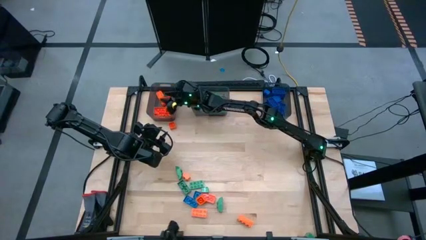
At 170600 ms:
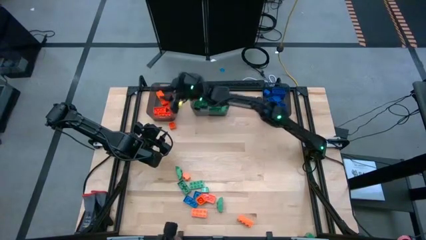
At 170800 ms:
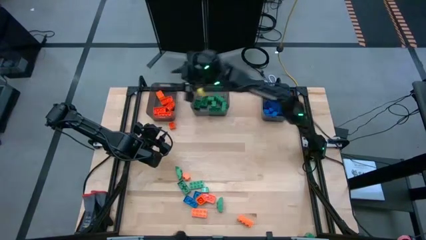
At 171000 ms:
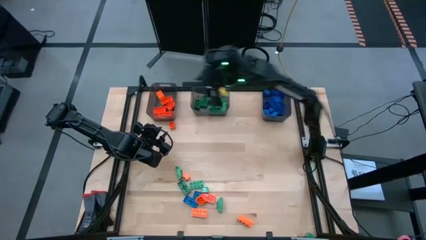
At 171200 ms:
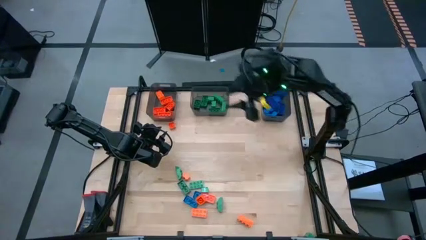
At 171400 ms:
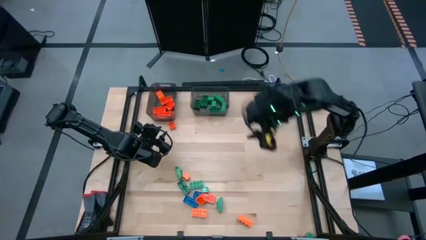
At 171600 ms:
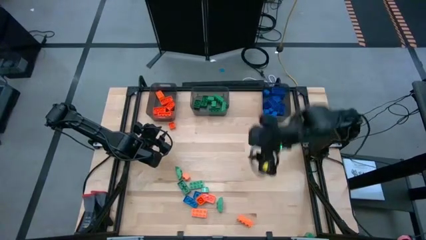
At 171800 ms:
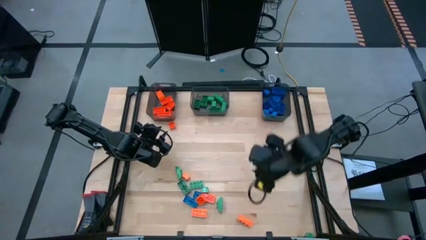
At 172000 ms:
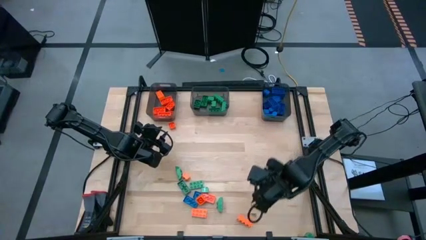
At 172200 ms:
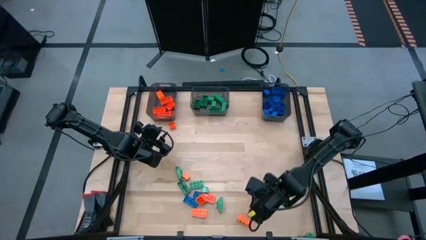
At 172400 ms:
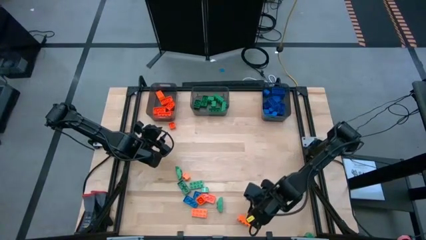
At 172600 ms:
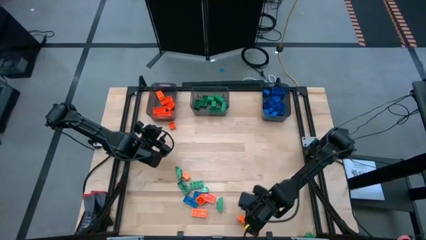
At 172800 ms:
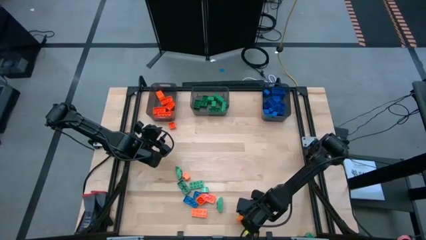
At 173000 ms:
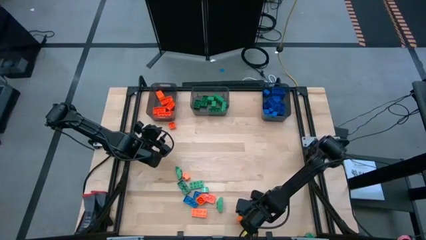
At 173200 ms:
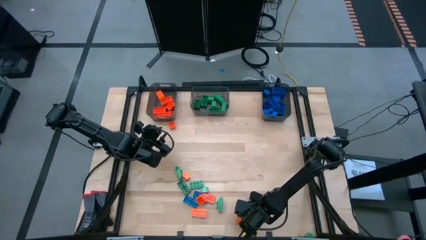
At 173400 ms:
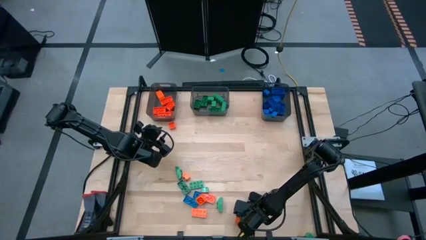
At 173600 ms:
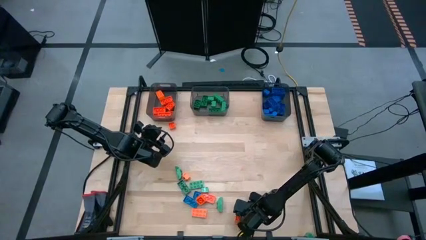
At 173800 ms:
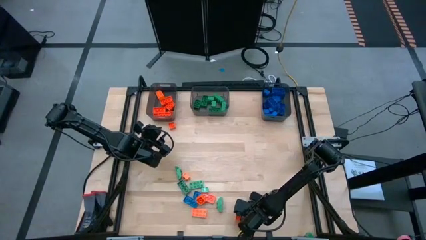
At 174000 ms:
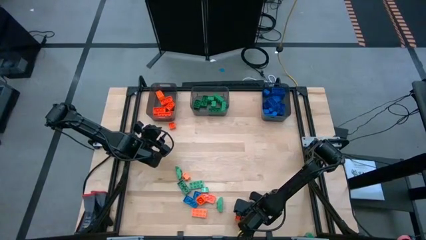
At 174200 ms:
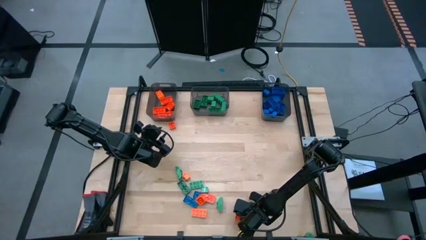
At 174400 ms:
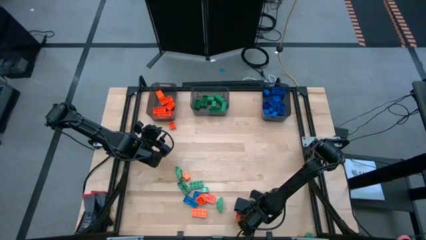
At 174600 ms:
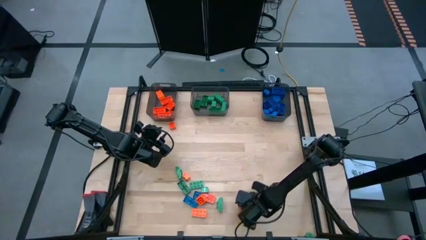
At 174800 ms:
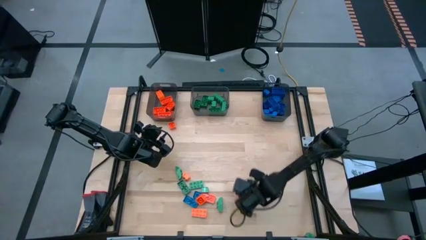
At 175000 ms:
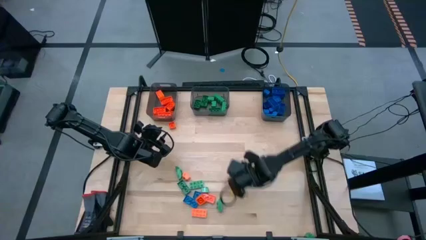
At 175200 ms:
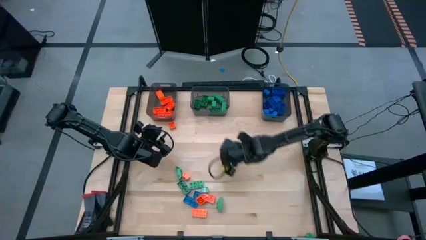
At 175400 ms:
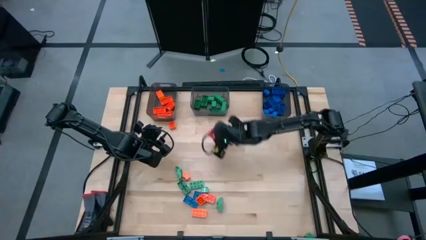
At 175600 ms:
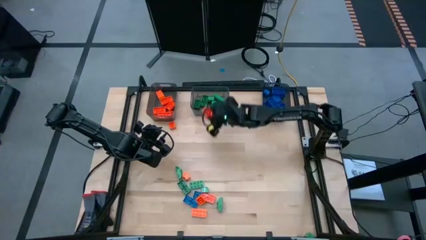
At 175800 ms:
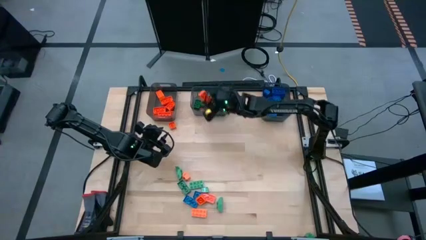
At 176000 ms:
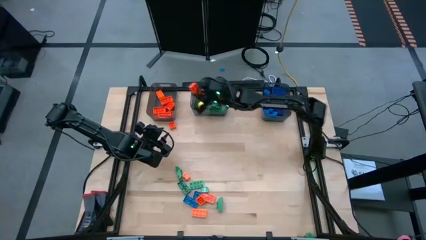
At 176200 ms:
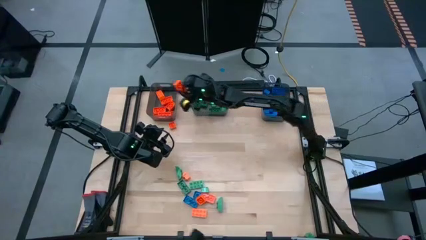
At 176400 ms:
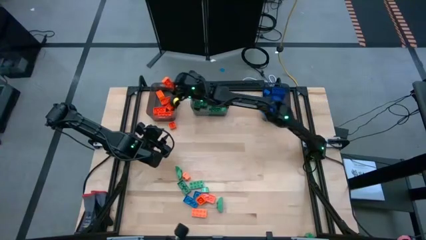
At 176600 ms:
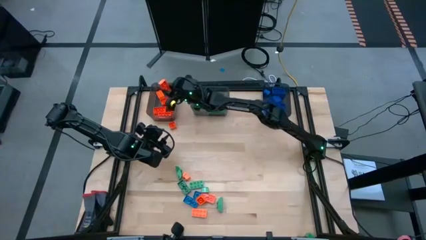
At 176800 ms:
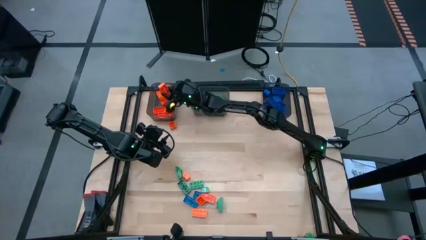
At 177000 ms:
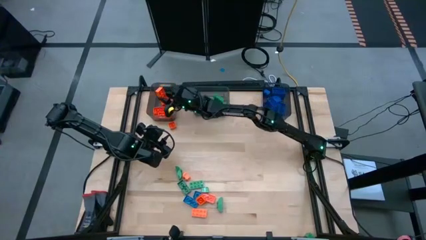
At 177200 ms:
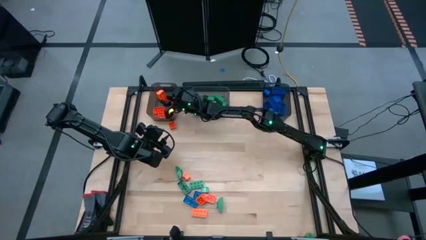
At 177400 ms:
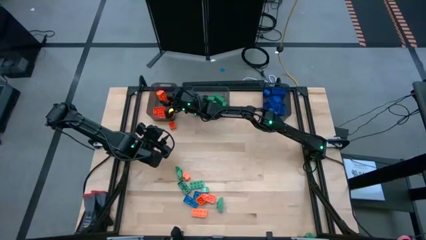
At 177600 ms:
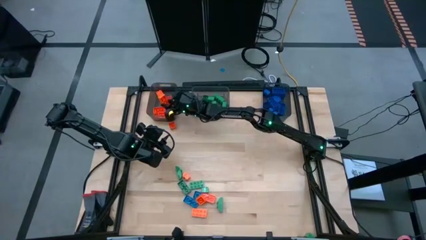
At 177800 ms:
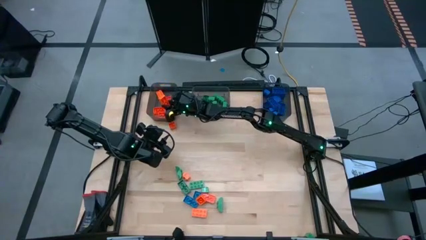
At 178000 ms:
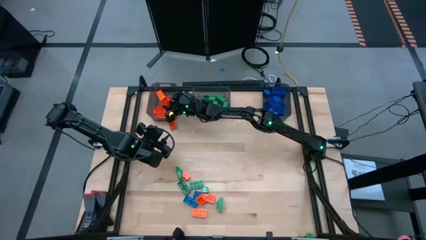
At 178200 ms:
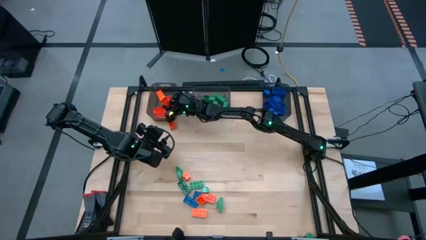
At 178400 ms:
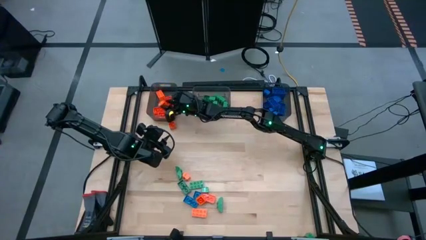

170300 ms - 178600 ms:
Task: Sort blocks
Put the orange game piece into the left black bin

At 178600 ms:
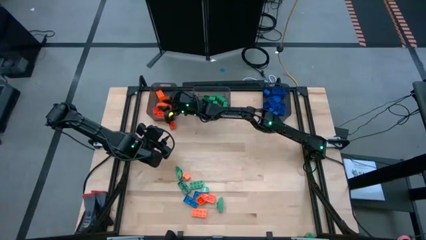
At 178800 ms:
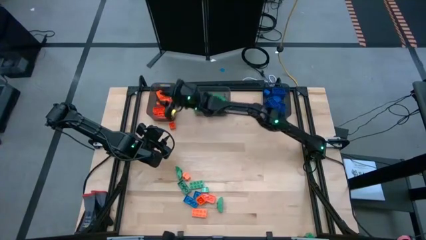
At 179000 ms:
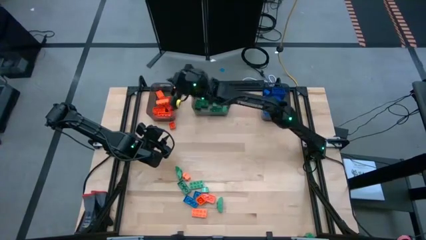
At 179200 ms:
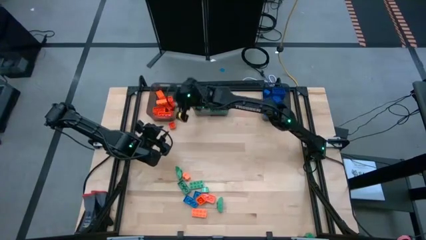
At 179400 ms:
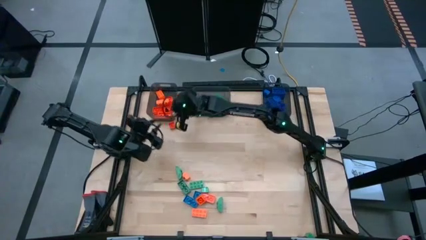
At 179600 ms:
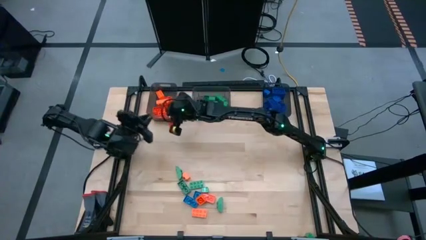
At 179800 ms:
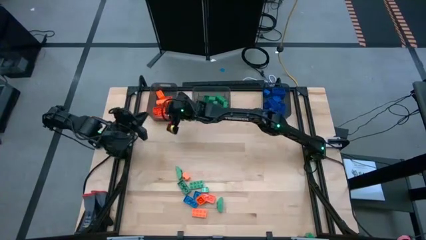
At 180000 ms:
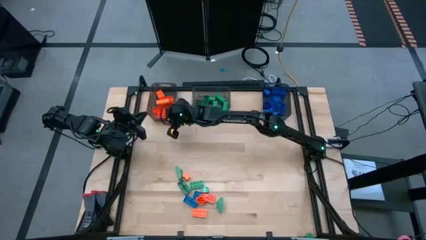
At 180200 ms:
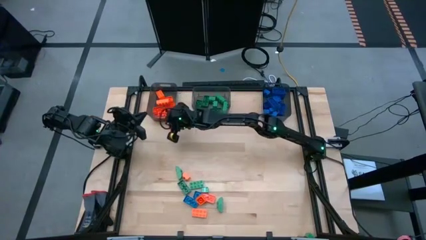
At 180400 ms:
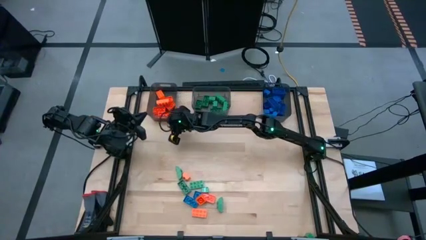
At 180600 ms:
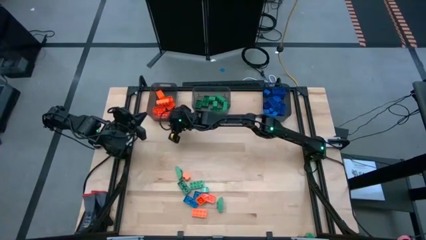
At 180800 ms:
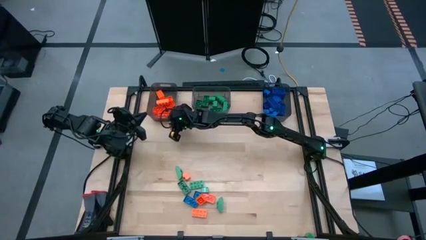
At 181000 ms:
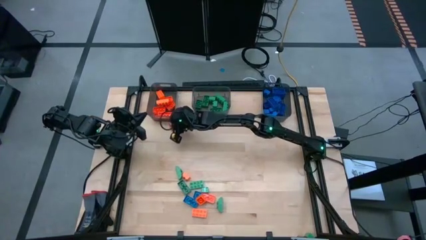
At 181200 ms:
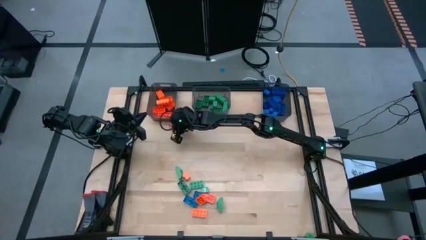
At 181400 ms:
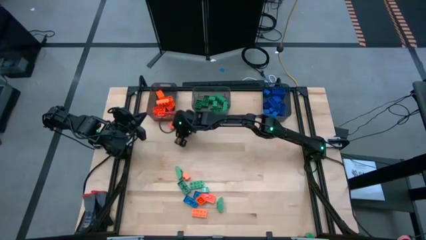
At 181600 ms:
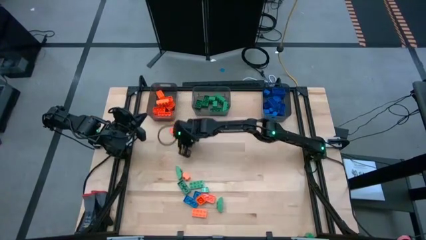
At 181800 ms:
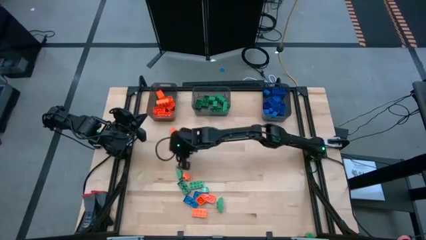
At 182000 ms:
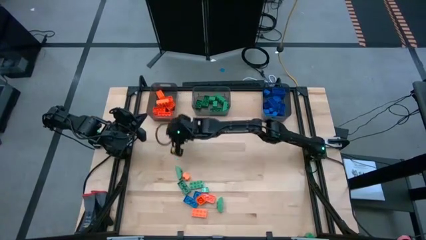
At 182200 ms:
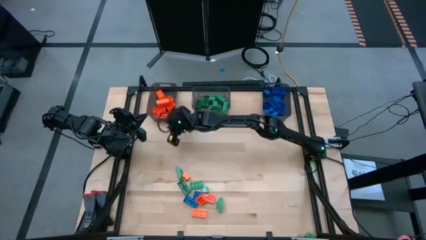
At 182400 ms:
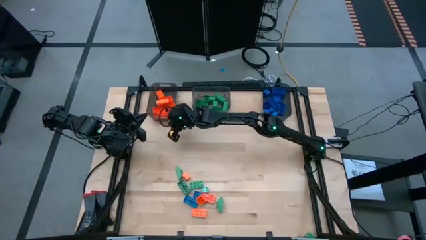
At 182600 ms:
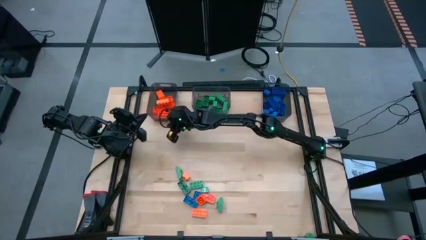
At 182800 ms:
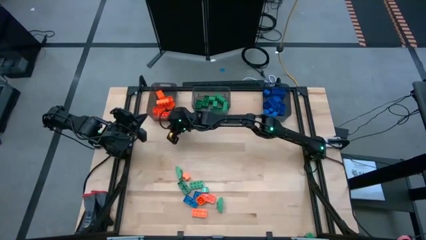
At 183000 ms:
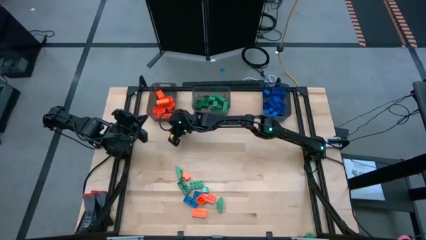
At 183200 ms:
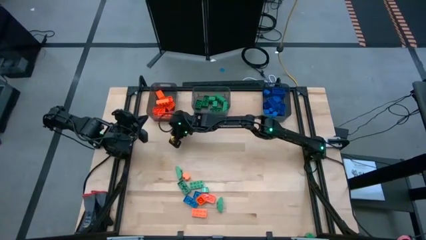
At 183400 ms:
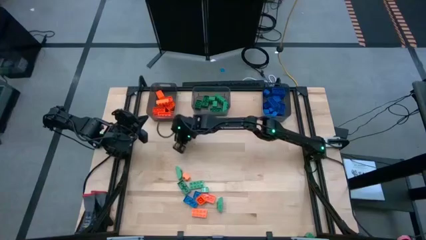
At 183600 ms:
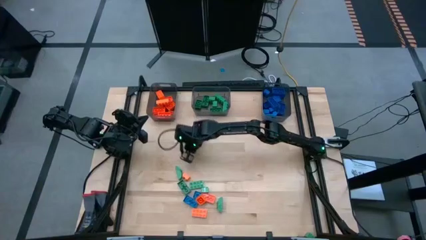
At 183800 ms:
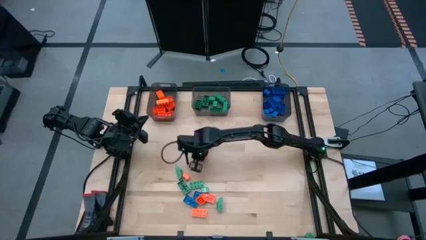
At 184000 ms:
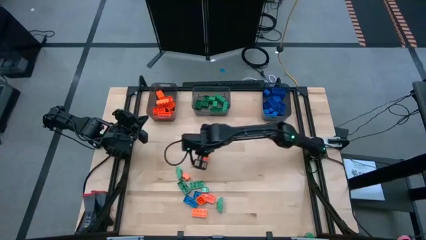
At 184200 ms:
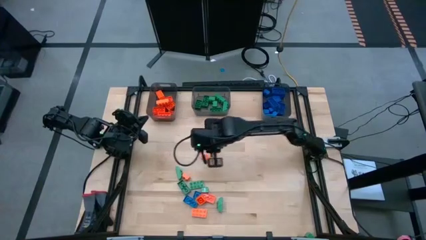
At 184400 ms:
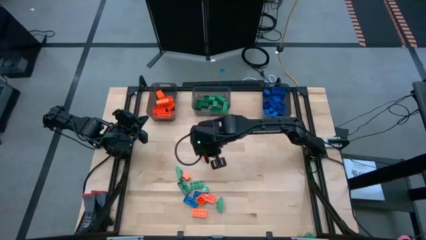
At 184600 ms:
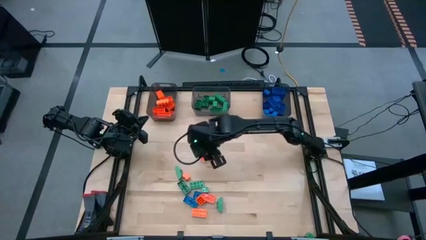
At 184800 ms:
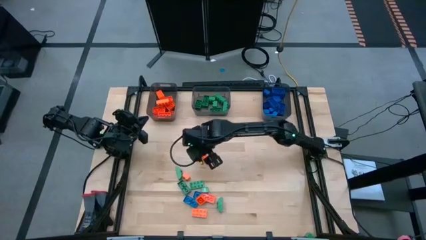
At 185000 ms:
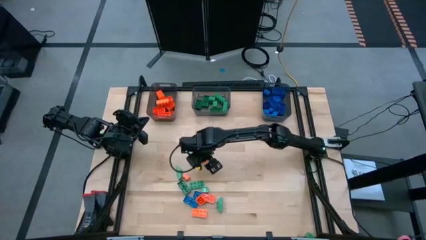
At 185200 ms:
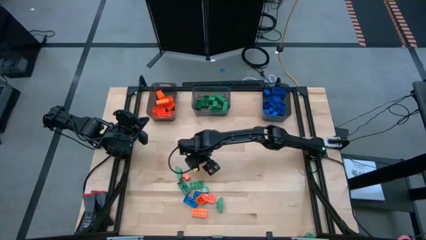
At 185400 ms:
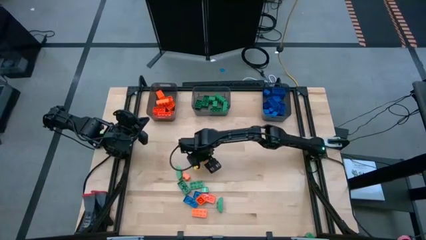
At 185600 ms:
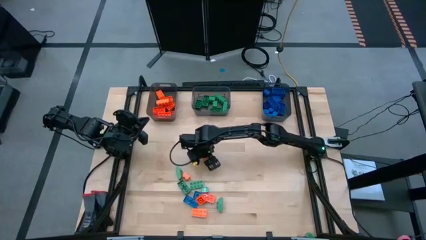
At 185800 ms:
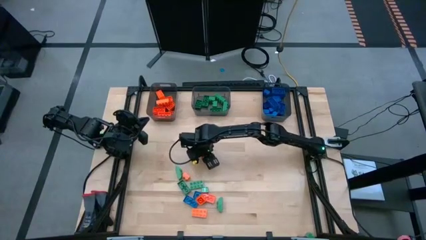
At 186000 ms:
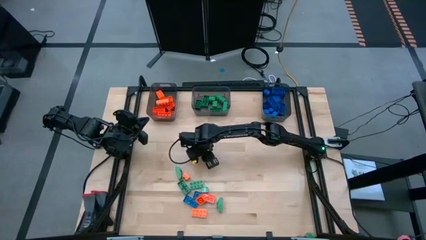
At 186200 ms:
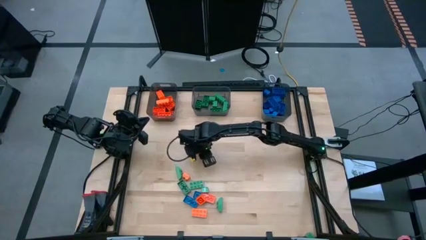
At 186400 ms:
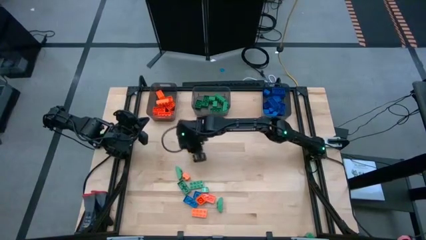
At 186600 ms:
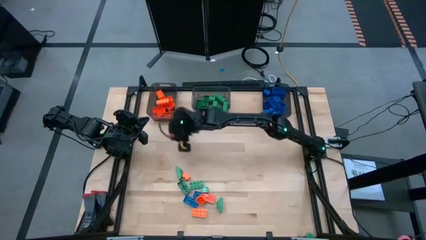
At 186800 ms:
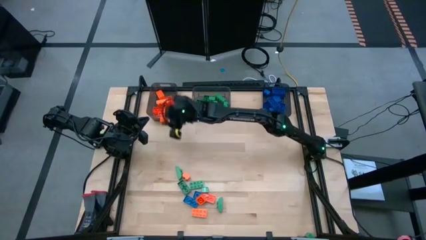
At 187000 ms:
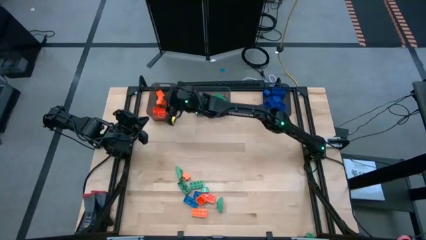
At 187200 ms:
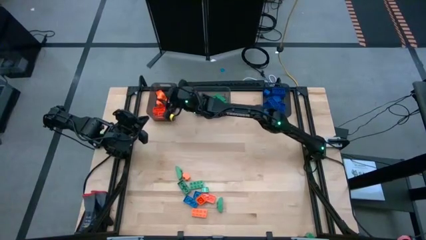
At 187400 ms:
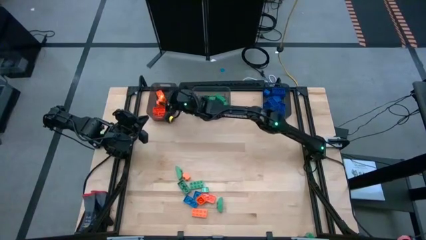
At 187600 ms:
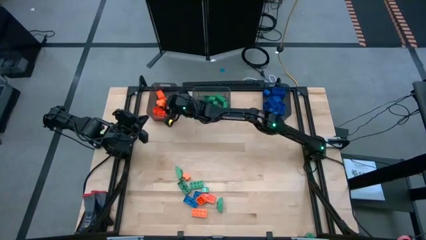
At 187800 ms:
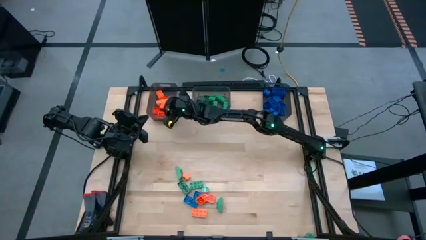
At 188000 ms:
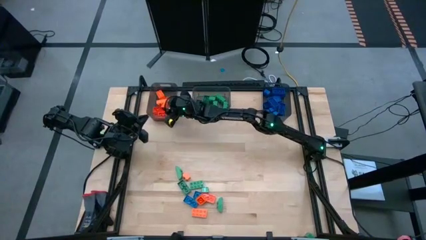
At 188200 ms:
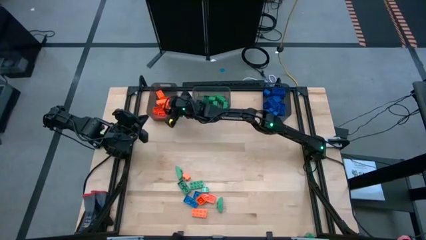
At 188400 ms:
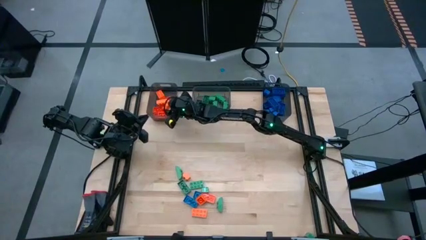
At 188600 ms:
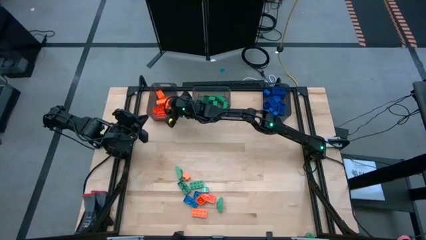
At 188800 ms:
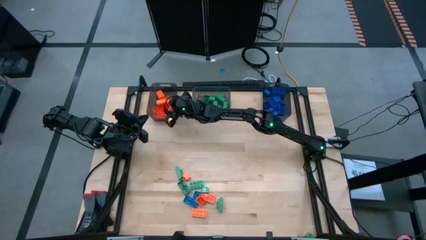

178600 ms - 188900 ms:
Put the orange game piece into the left black bin
